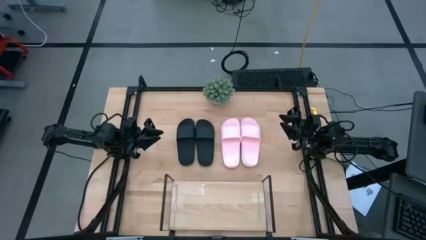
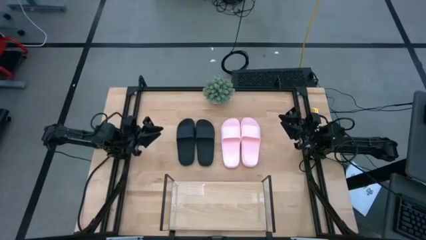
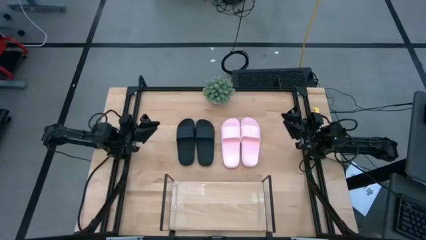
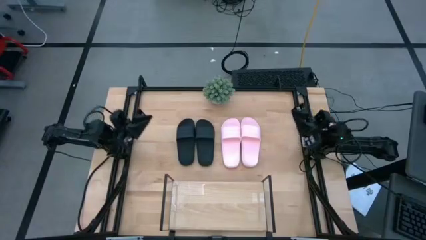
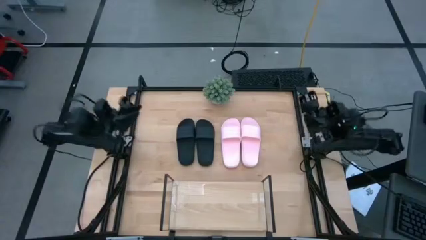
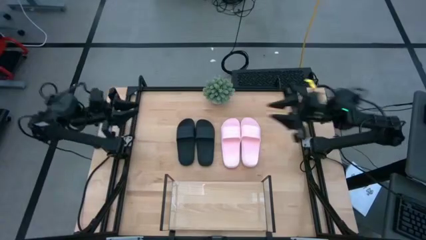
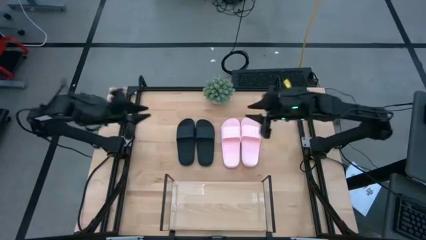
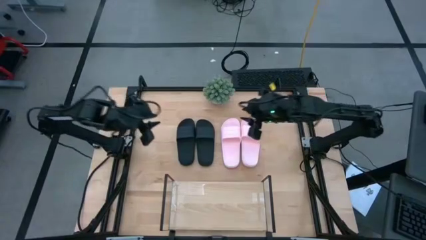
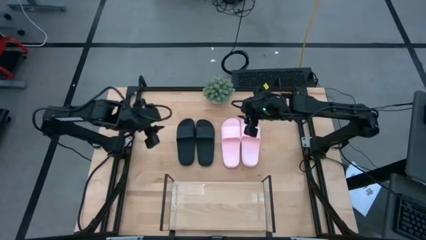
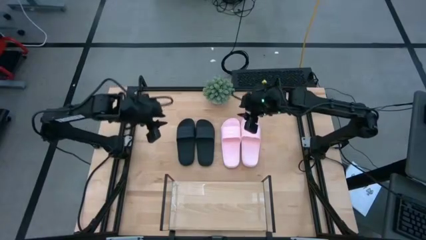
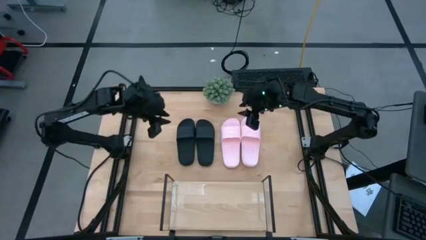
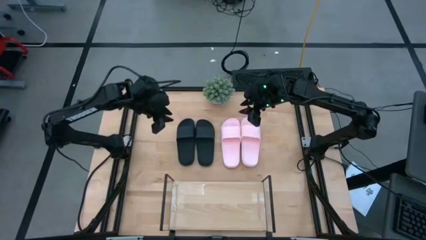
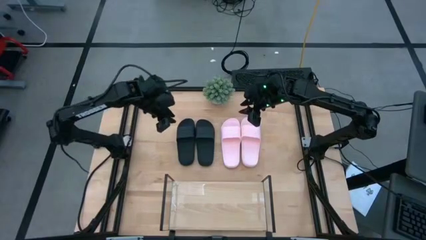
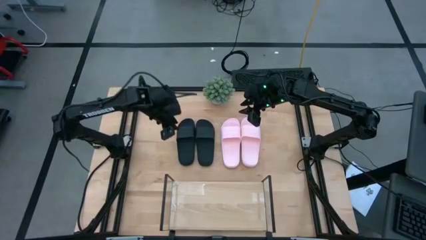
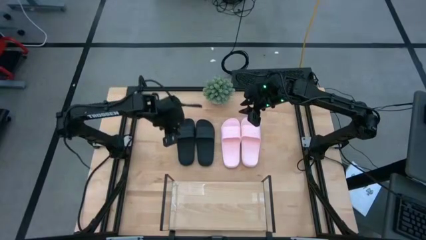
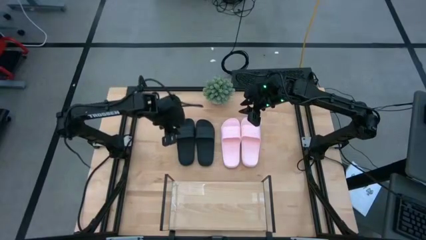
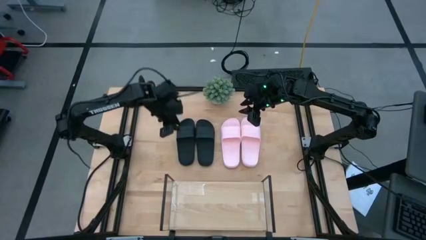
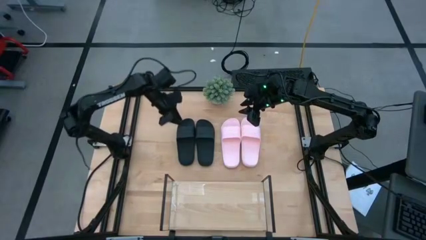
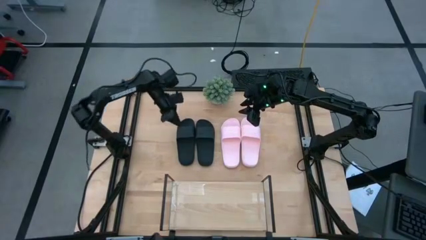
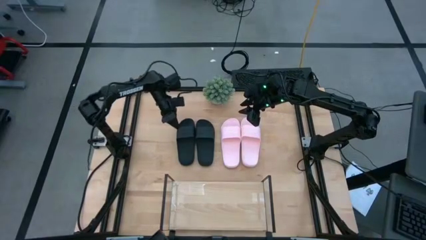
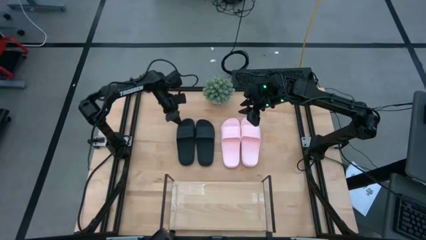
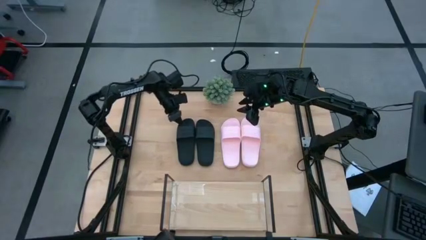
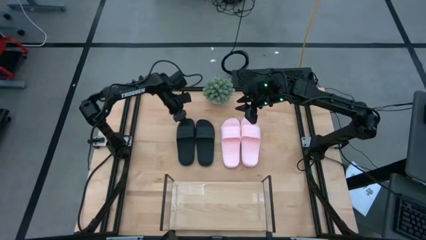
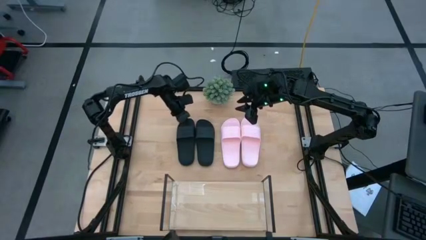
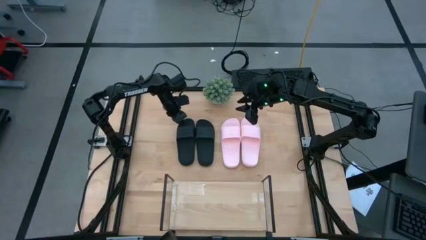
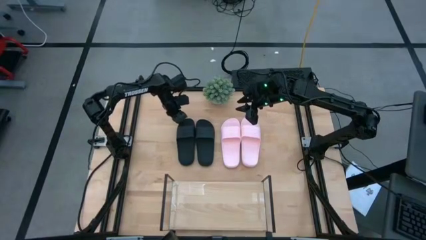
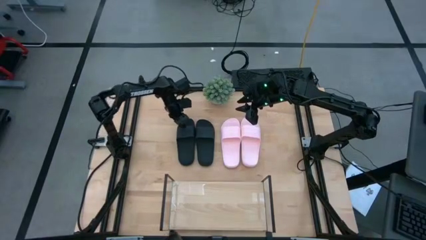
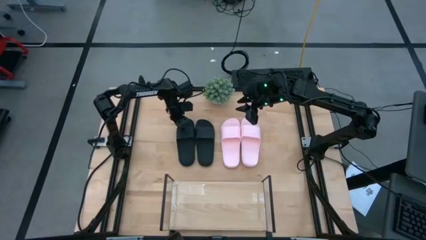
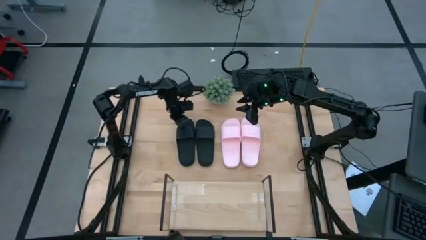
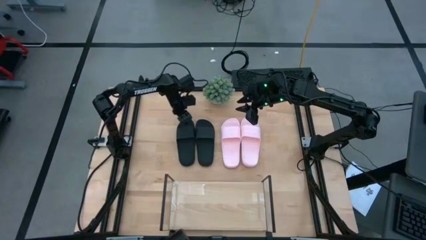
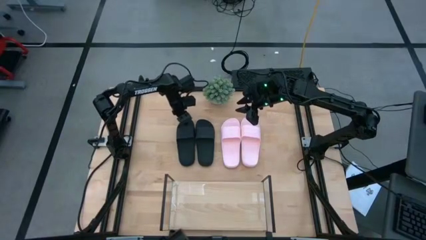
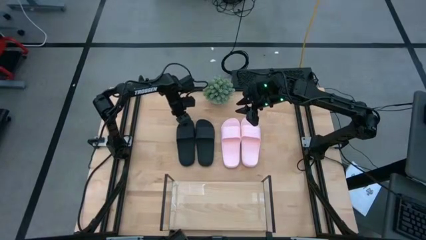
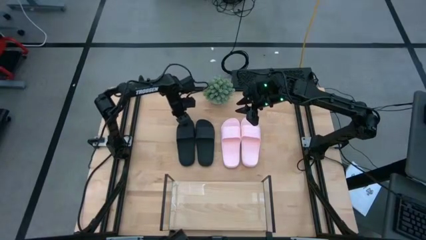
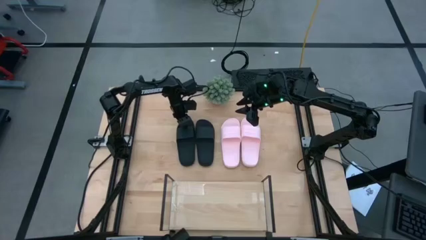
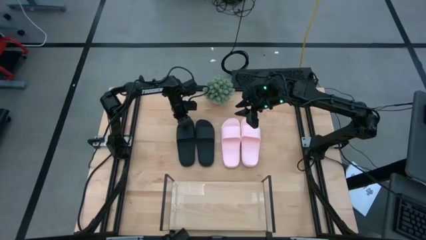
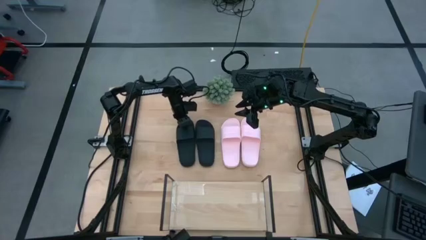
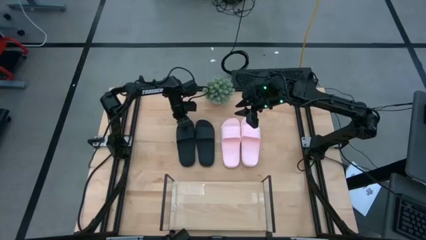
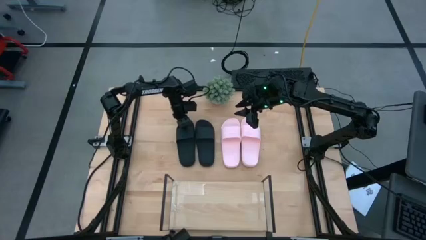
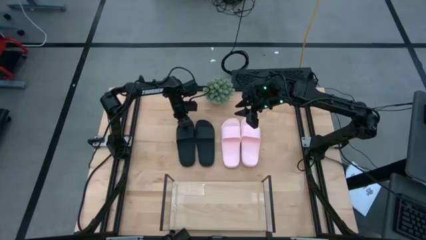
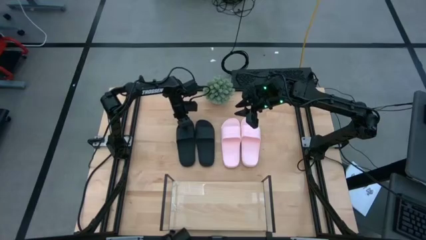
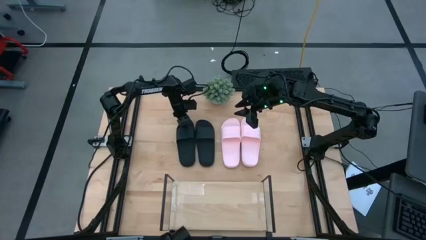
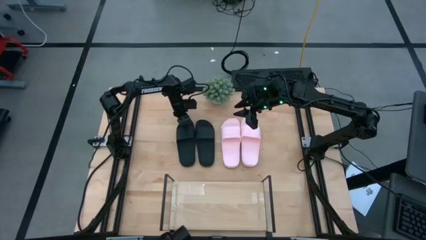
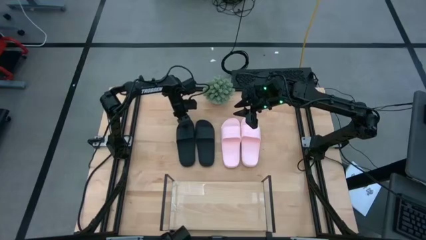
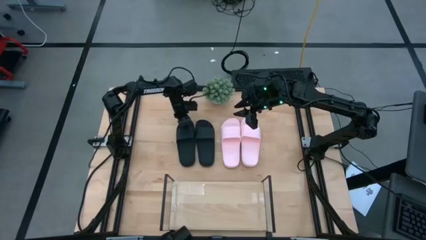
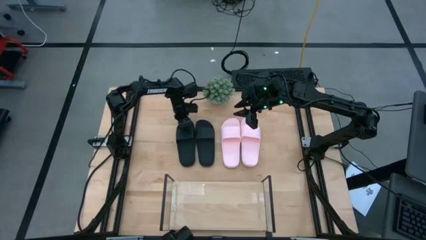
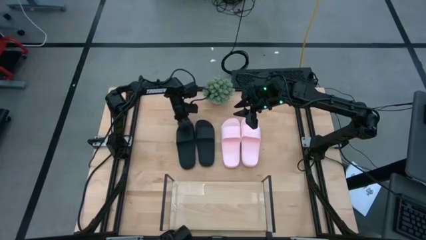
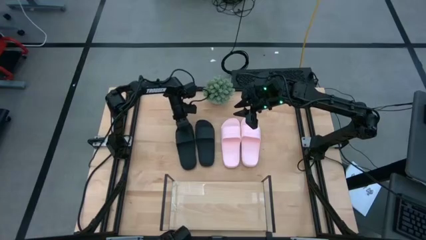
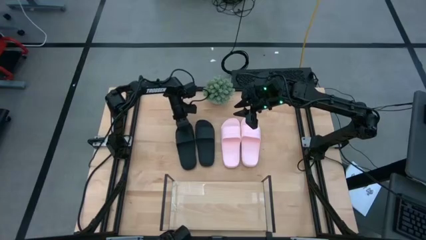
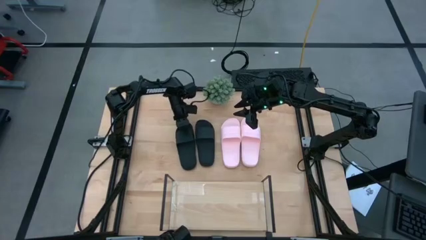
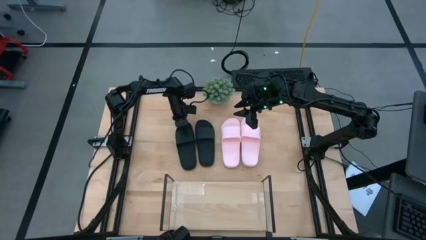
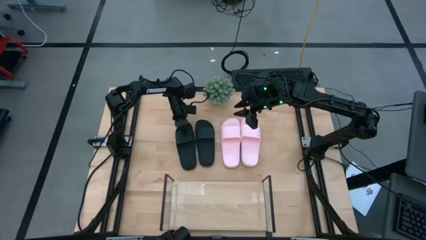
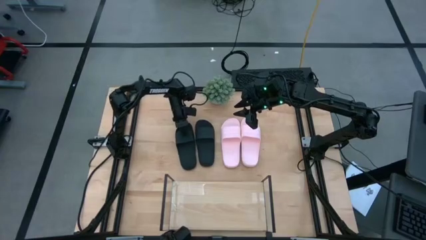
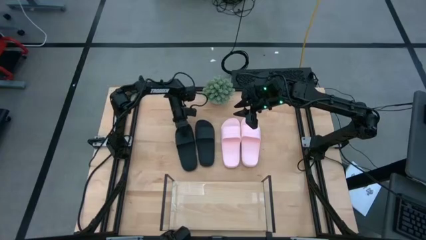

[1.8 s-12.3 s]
Task: Pick and place slides into the shelf
Put the left black slide on the shelf
